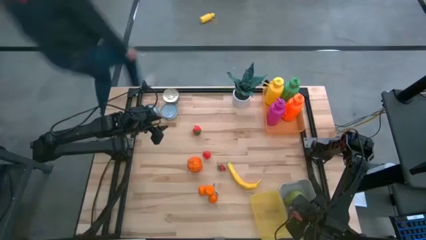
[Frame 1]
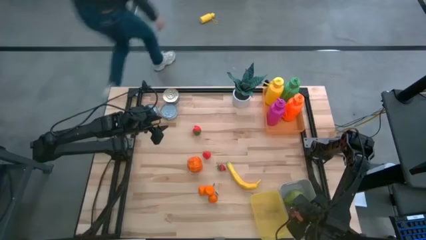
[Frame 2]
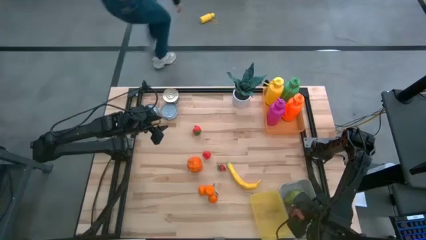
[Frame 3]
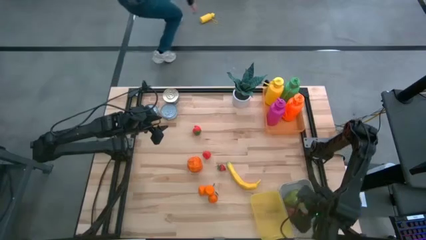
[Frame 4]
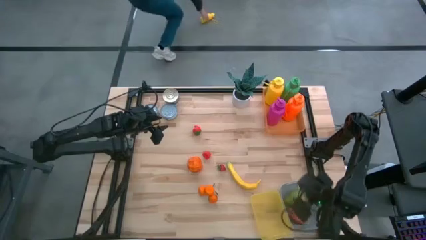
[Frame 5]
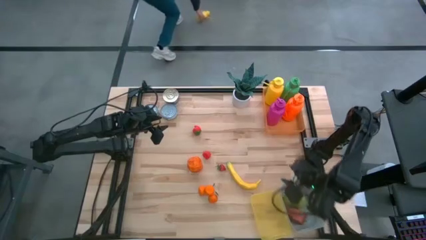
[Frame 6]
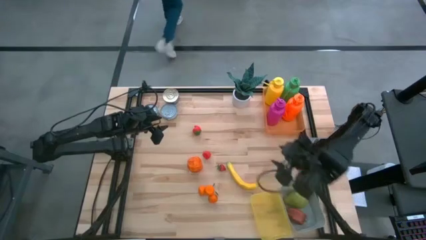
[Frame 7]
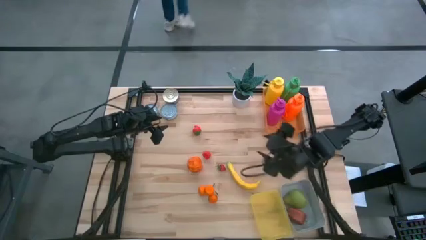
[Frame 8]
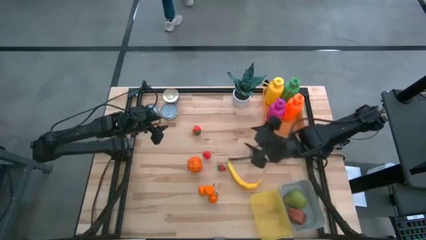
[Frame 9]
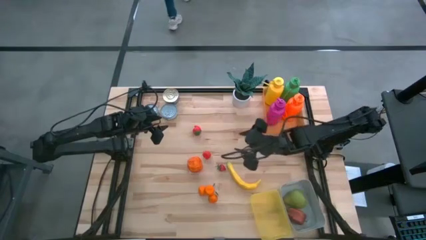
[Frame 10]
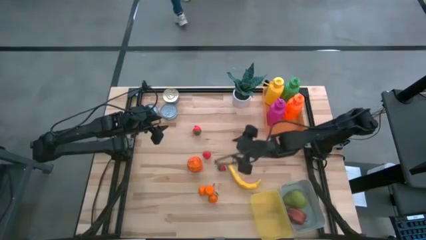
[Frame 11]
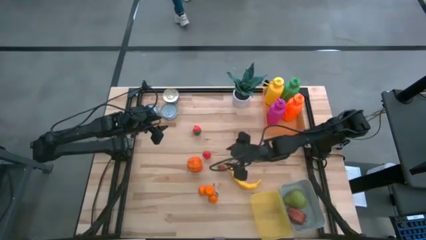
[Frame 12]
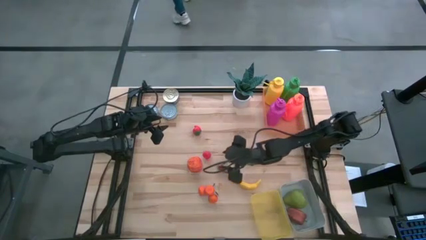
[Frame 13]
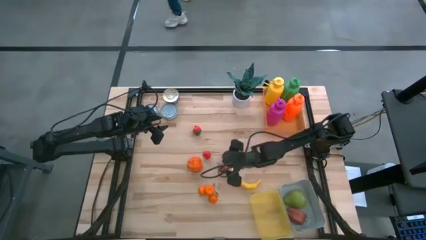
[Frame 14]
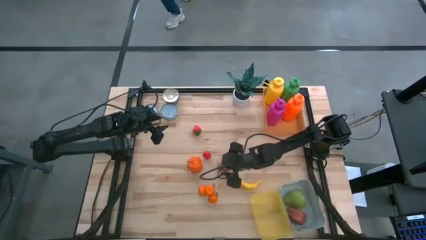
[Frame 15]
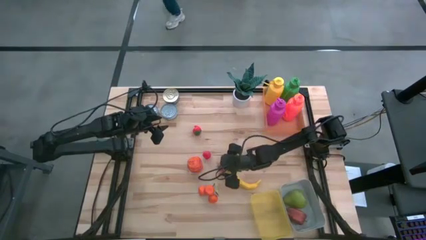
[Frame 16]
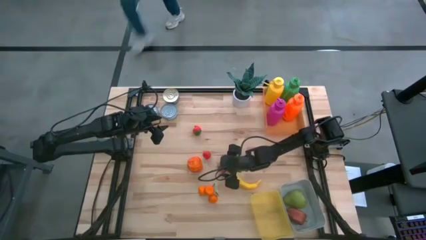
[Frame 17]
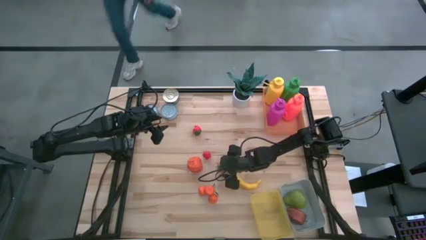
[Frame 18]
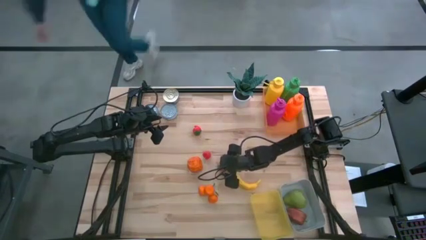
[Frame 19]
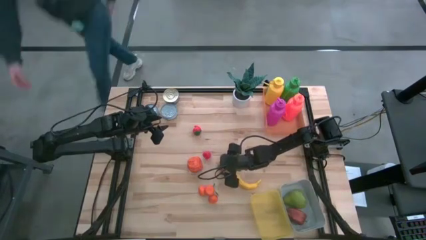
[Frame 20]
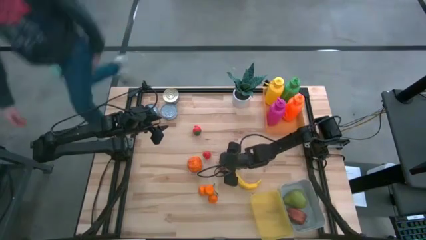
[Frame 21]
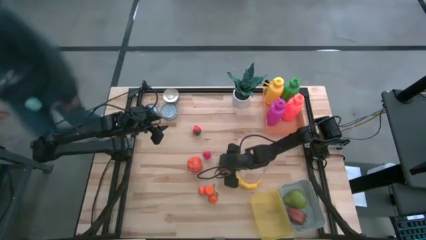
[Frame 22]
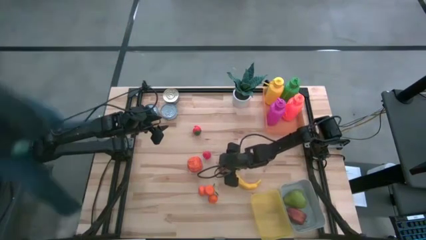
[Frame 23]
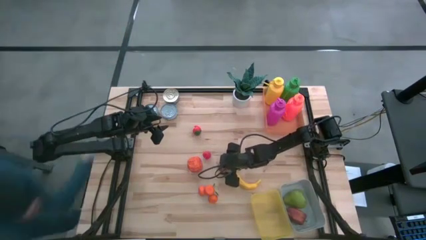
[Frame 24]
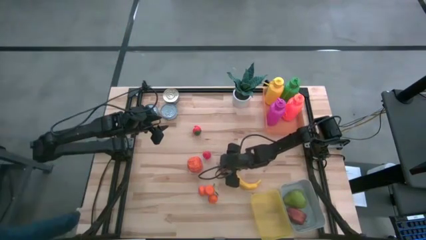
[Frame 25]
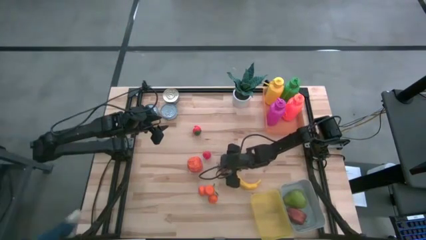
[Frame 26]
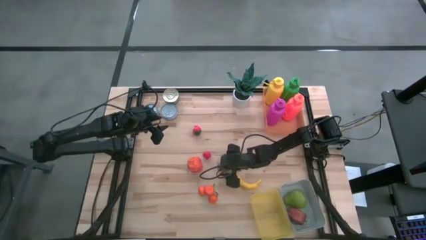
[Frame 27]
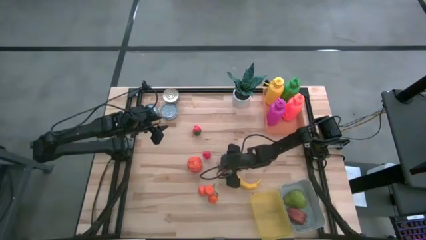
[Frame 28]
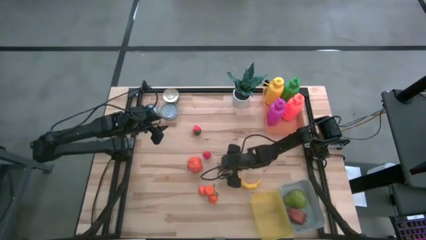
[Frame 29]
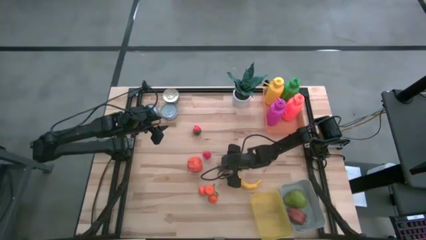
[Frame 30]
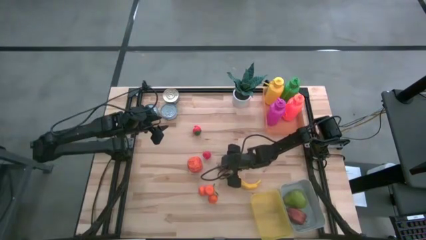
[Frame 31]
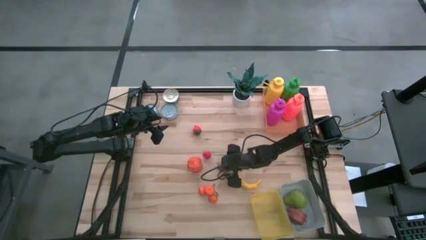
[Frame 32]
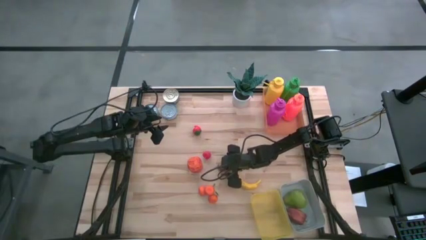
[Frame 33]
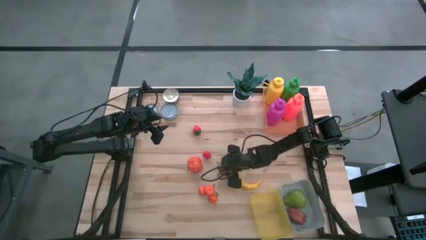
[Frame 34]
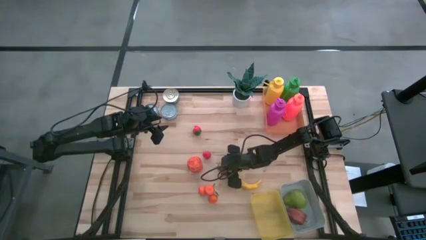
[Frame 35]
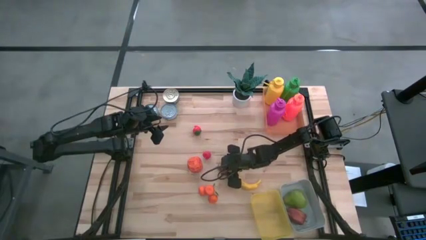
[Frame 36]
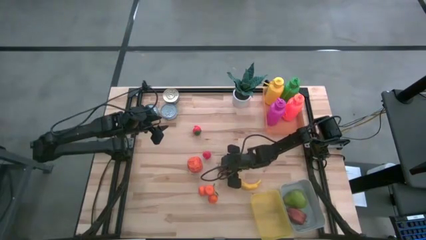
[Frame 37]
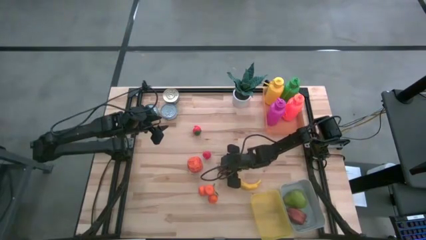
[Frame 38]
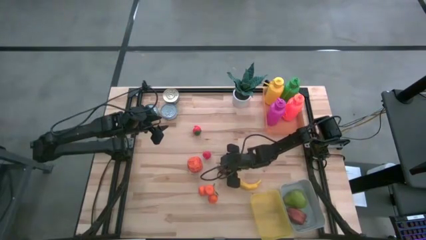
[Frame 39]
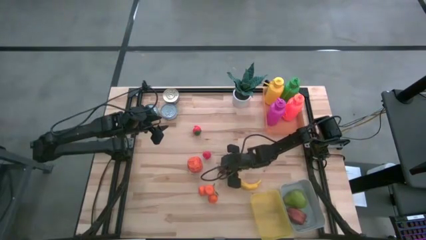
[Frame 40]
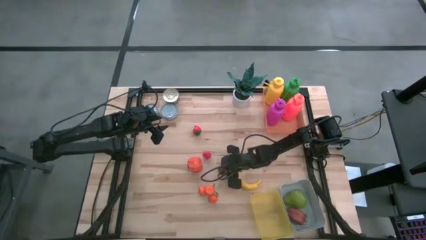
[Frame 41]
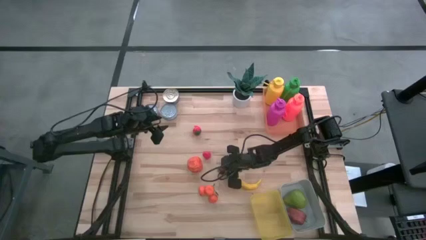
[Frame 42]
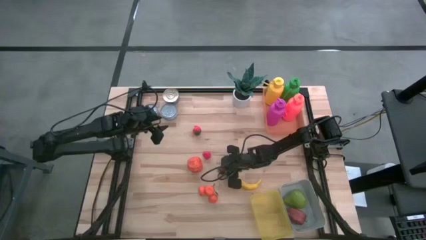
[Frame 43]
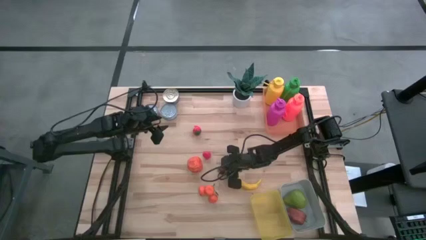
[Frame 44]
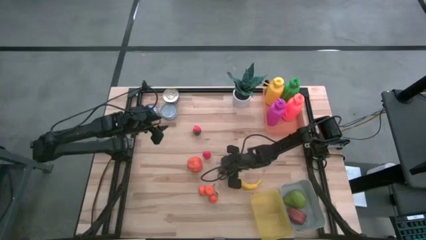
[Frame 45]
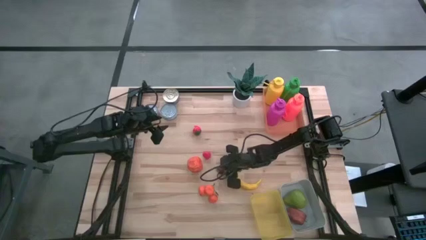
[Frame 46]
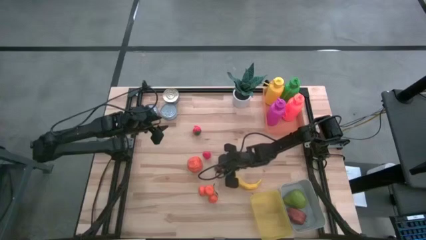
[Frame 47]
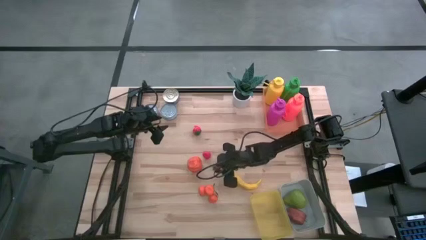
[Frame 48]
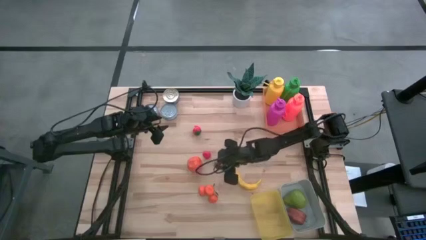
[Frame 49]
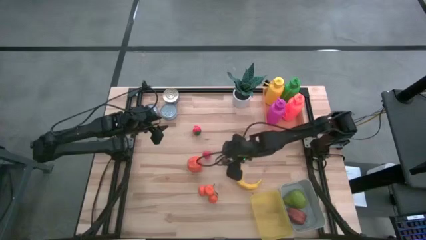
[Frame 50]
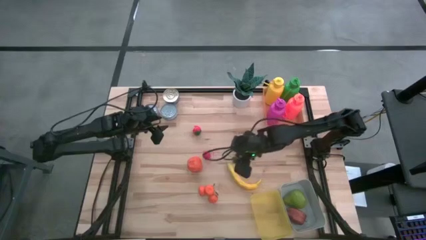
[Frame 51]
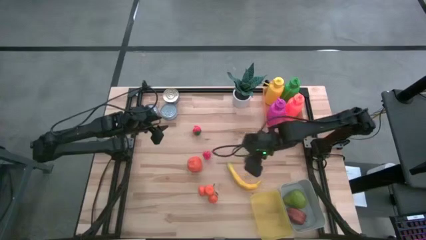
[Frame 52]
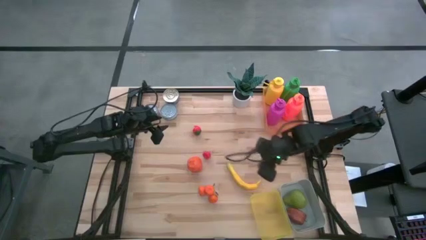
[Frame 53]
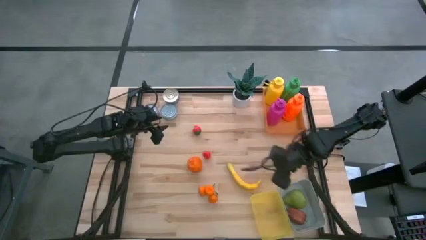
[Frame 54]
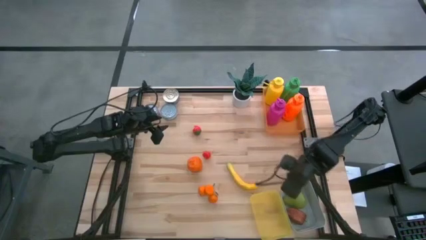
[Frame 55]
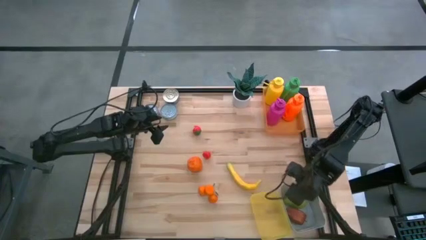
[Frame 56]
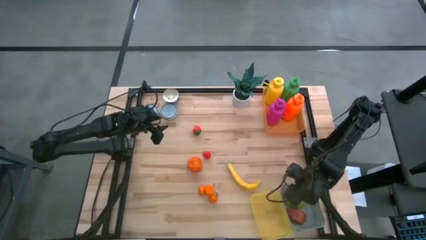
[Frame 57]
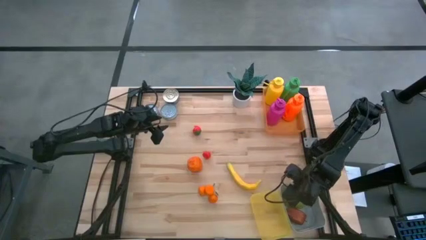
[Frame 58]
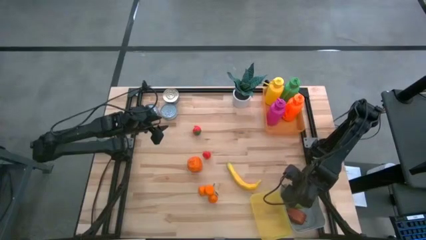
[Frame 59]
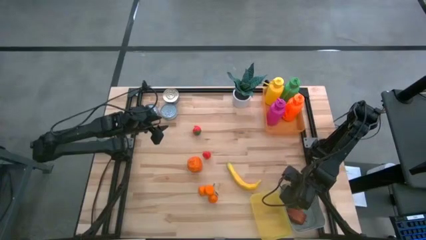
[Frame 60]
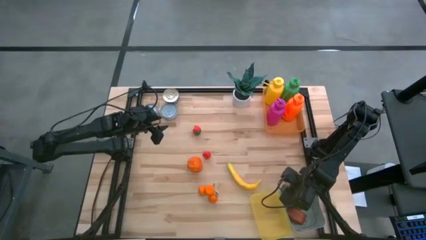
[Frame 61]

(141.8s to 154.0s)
Task: Pick & Place Food Item
Put the bottom red strawberry into the gray bin
